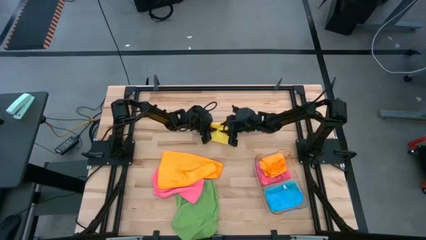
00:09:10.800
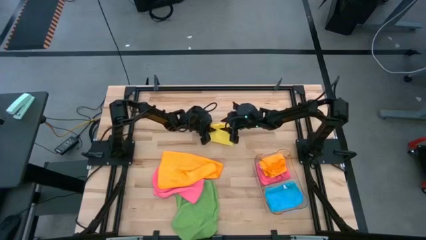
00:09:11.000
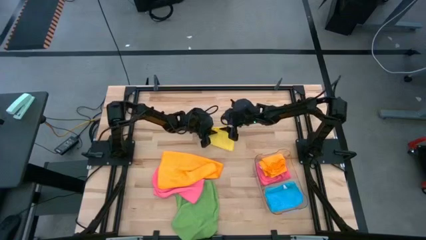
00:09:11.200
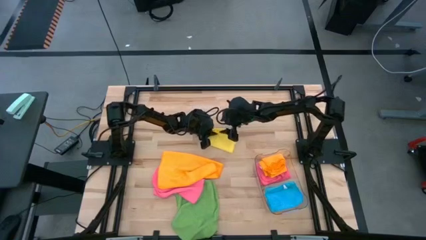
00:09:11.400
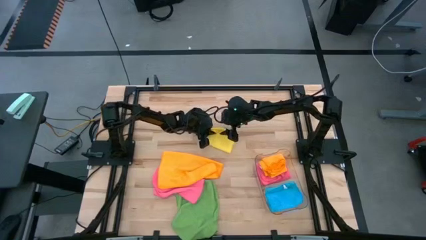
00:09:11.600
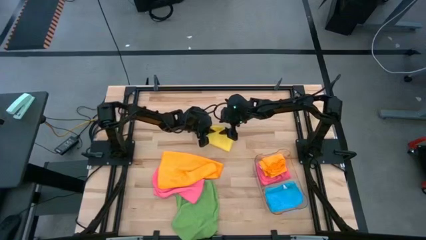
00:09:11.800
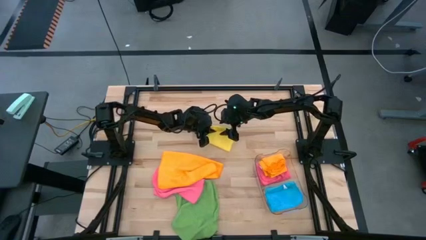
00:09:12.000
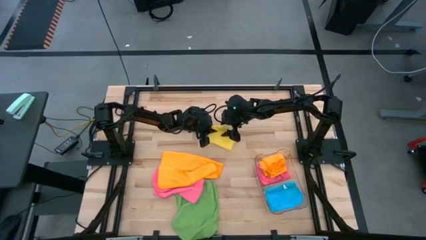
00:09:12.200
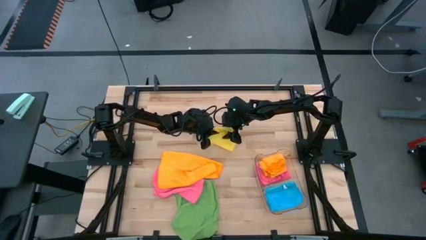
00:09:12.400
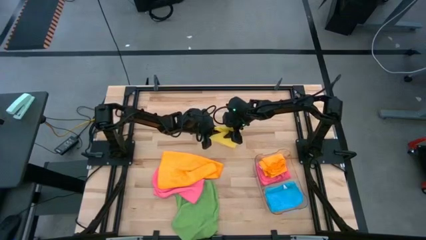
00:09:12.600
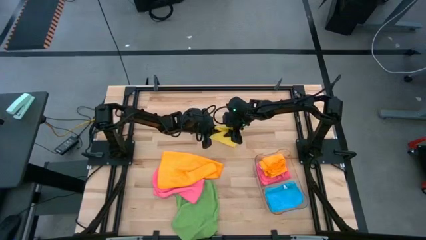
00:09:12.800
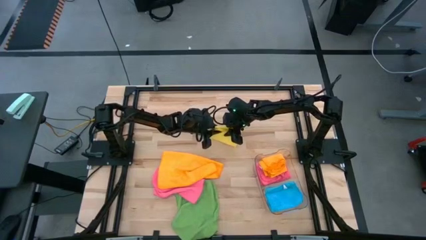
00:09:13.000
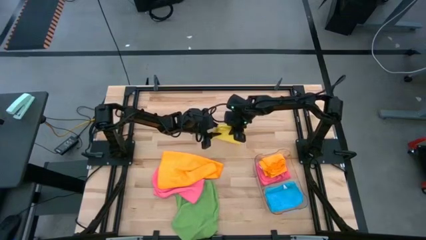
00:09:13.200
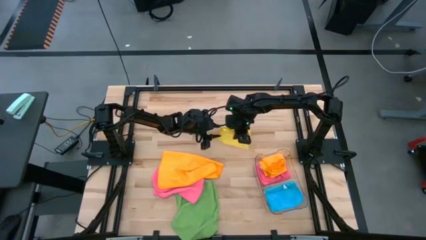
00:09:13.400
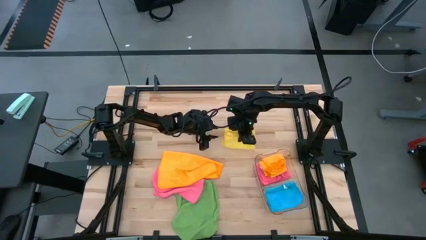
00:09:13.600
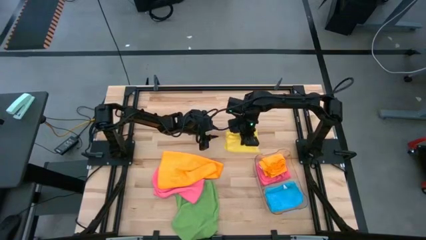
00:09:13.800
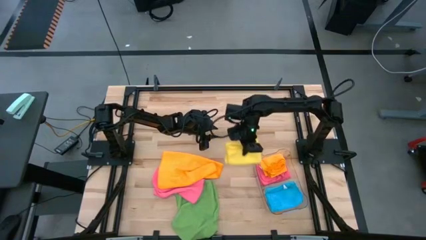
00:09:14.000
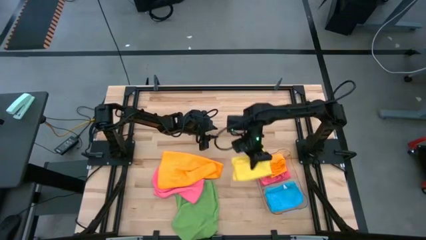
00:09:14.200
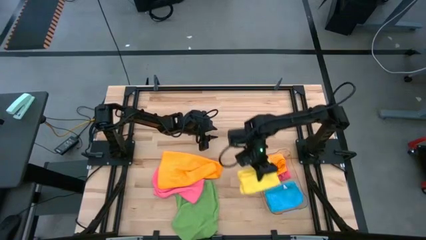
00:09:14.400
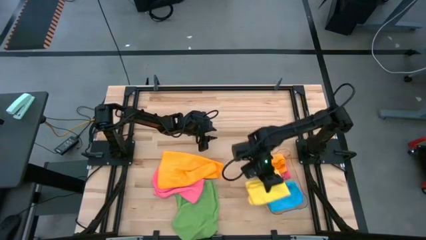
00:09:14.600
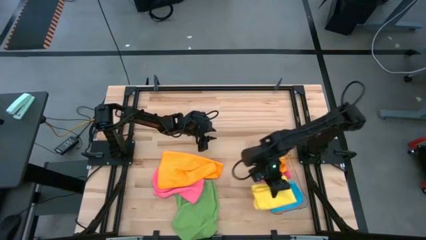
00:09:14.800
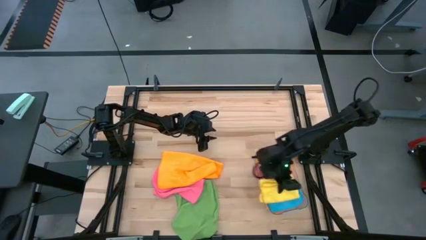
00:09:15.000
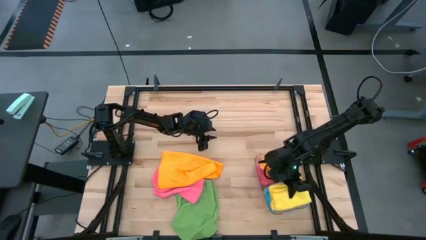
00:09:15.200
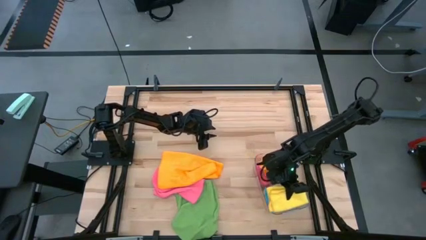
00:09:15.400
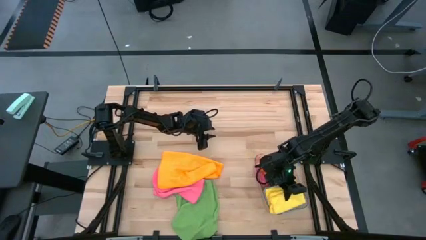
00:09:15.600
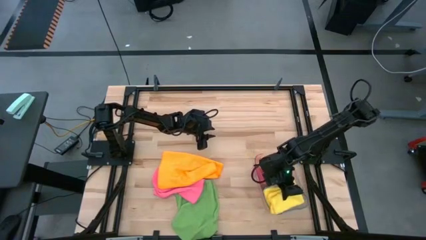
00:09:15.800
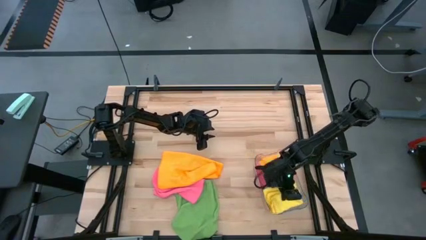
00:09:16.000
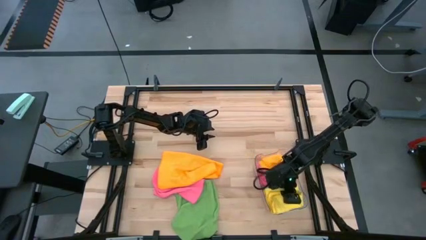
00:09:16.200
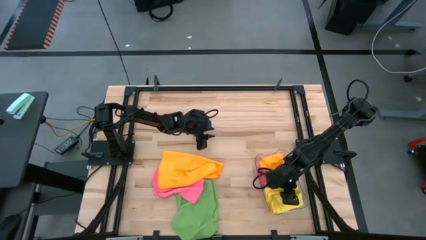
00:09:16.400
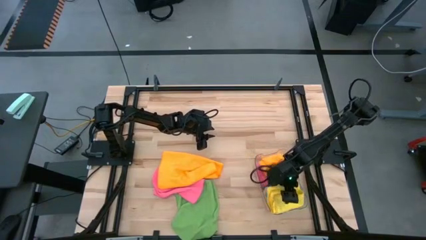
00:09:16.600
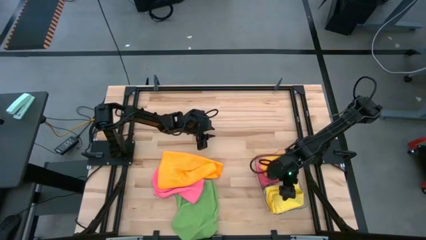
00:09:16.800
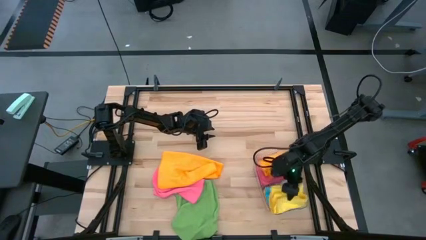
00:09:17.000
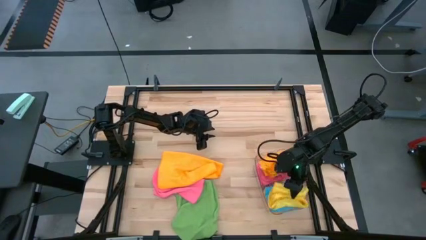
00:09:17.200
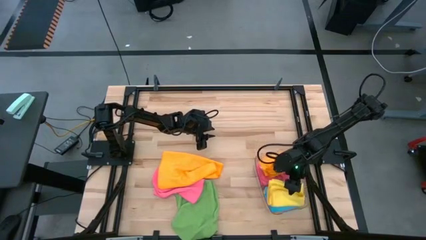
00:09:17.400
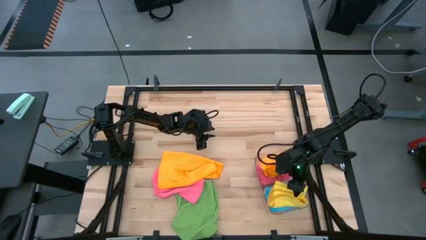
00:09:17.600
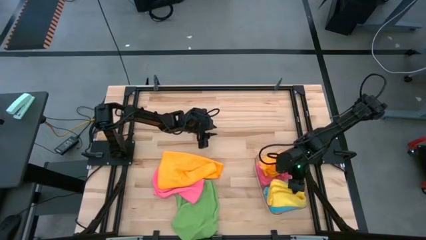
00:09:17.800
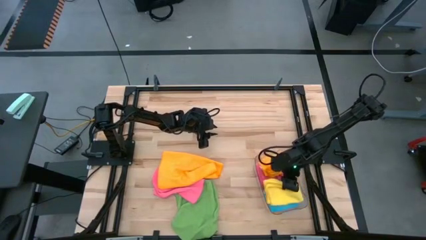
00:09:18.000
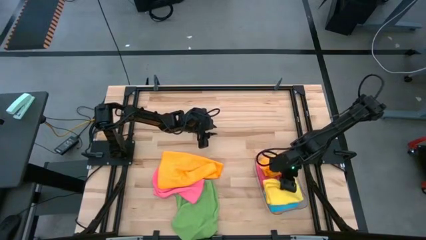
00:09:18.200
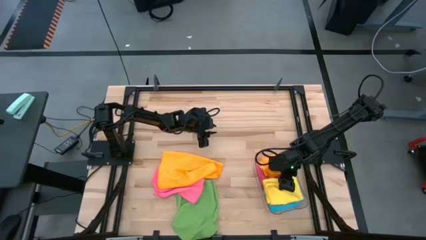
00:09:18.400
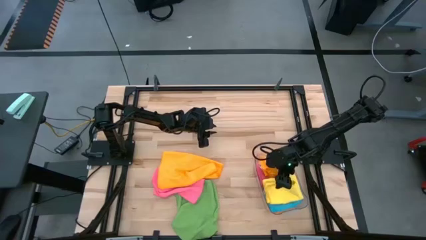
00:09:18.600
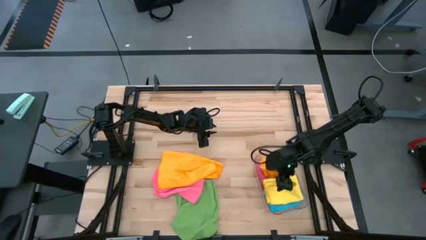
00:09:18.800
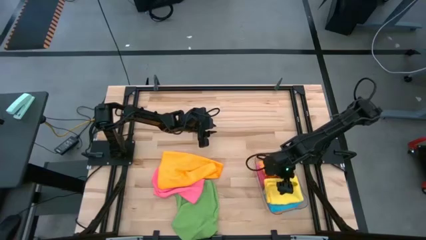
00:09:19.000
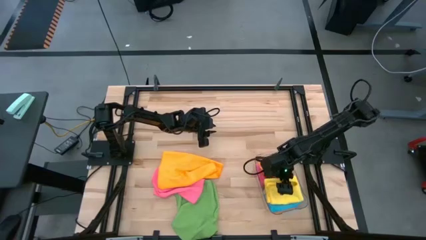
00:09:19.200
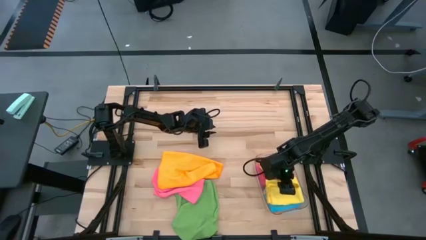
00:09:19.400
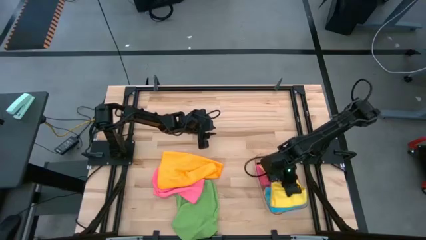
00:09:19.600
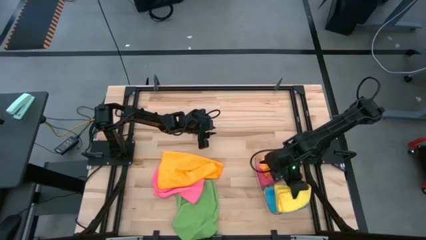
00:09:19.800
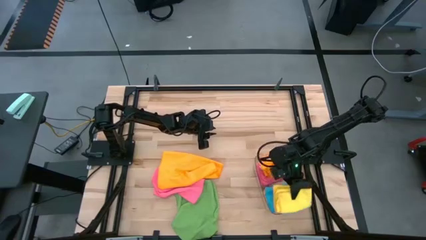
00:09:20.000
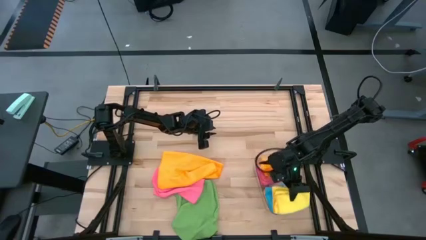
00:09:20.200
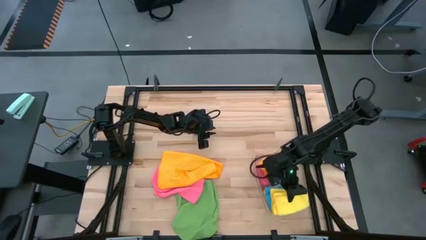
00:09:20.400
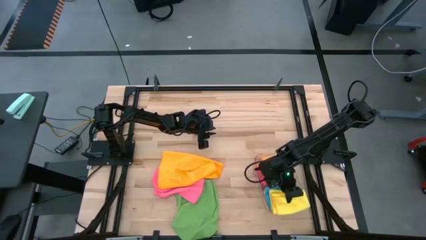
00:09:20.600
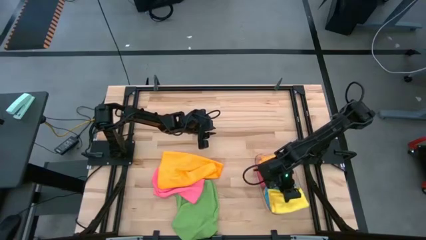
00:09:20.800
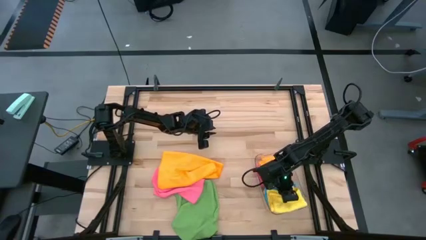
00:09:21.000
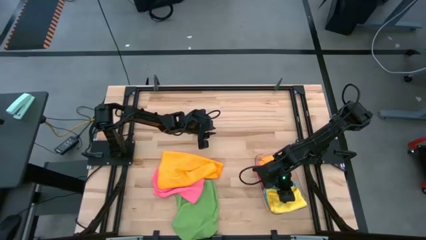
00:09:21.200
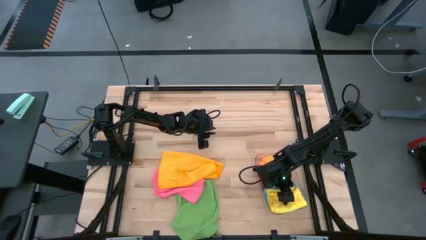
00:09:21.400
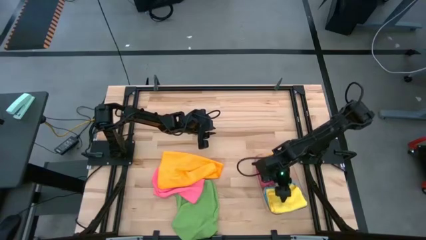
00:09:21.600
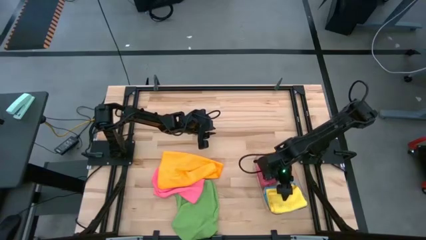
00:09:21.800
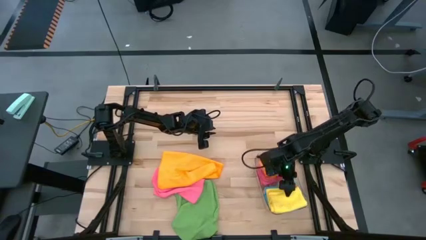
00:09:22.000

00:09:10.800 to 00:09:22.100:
Task: Fold microfiber towels
Put the folded yellow towel into the transparent bin

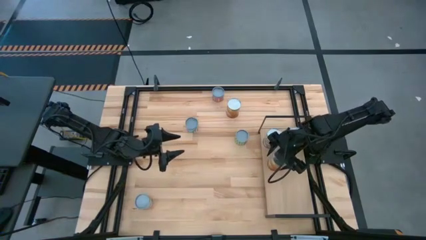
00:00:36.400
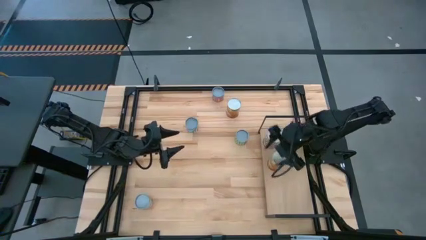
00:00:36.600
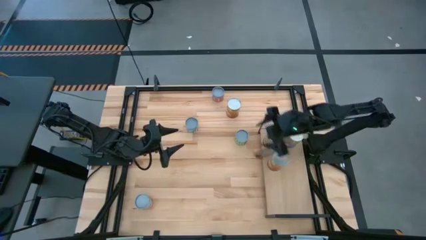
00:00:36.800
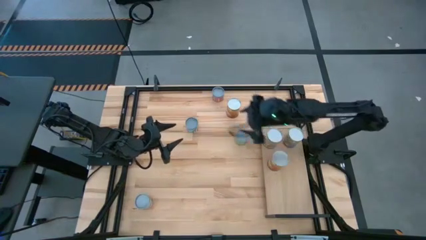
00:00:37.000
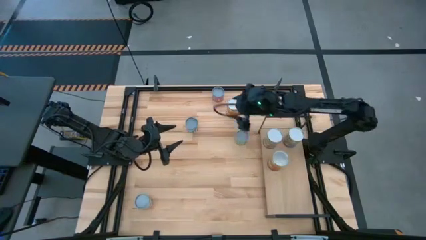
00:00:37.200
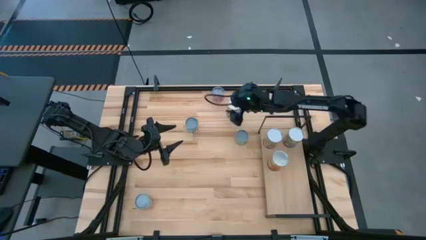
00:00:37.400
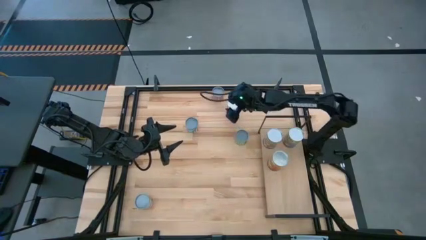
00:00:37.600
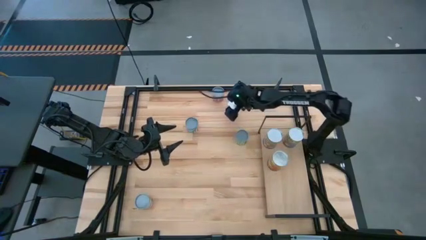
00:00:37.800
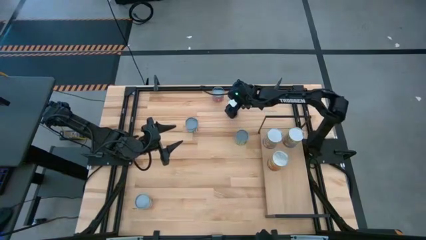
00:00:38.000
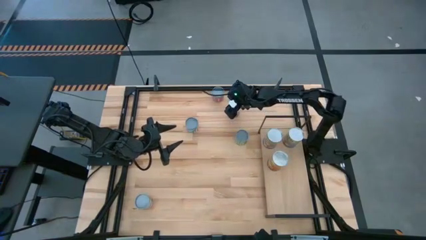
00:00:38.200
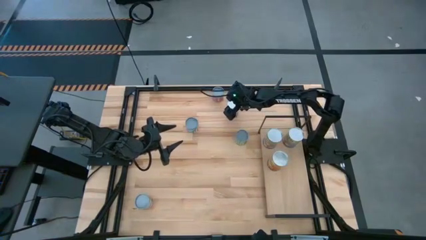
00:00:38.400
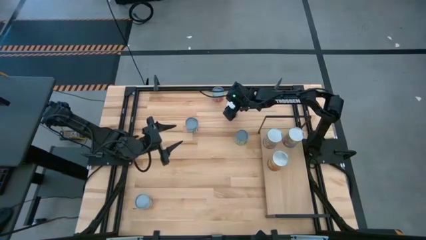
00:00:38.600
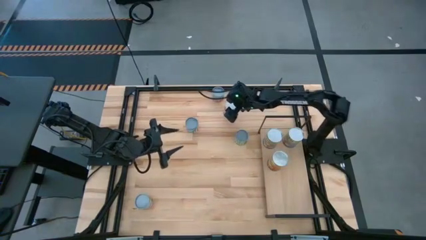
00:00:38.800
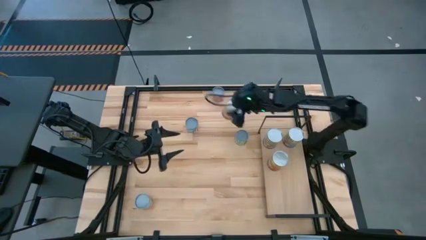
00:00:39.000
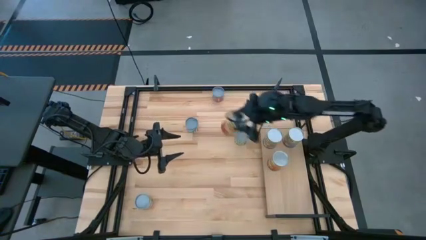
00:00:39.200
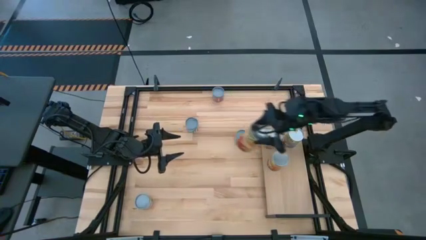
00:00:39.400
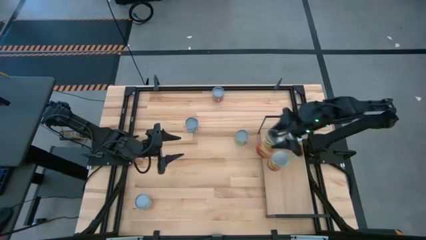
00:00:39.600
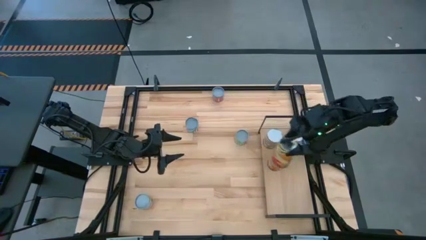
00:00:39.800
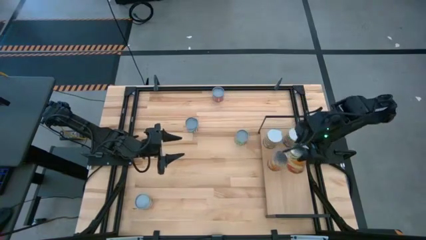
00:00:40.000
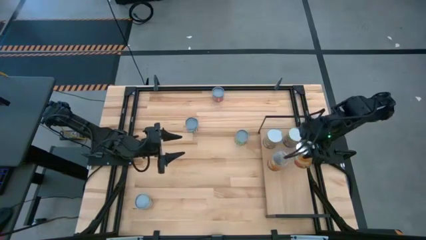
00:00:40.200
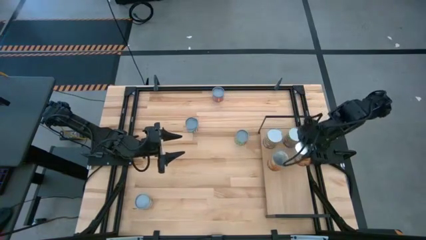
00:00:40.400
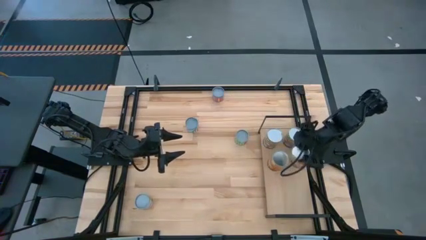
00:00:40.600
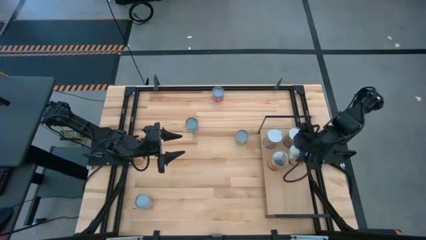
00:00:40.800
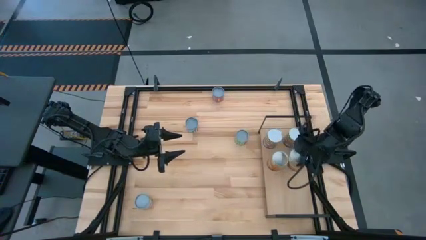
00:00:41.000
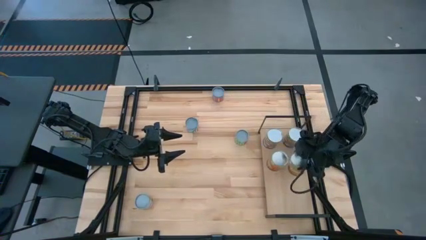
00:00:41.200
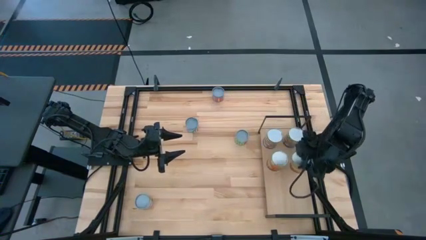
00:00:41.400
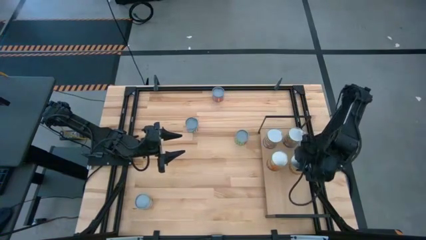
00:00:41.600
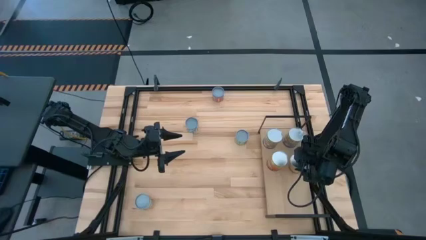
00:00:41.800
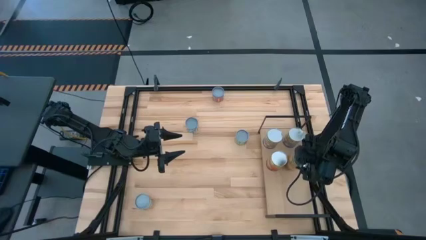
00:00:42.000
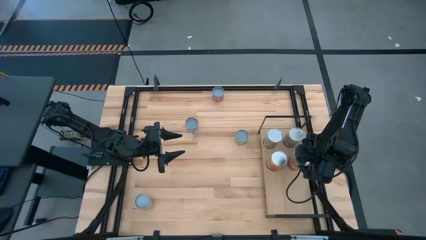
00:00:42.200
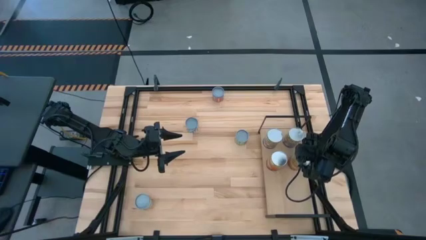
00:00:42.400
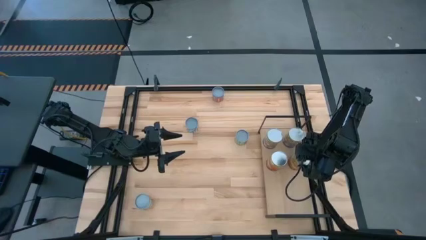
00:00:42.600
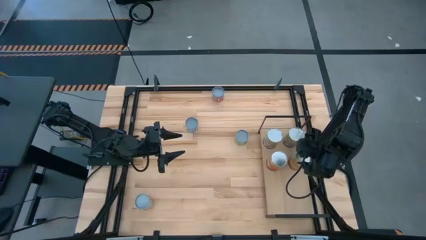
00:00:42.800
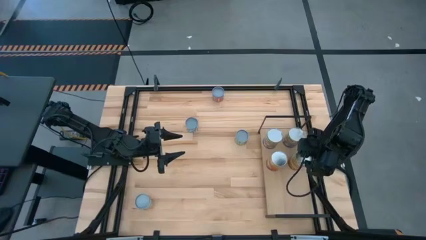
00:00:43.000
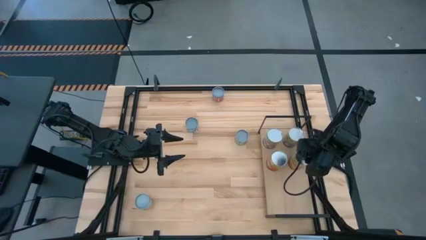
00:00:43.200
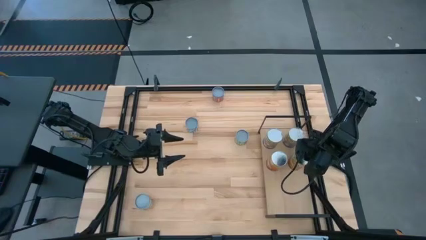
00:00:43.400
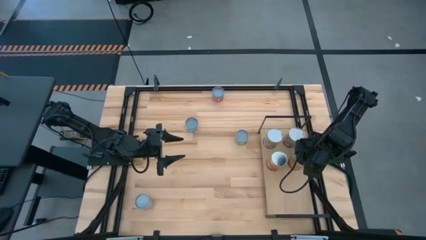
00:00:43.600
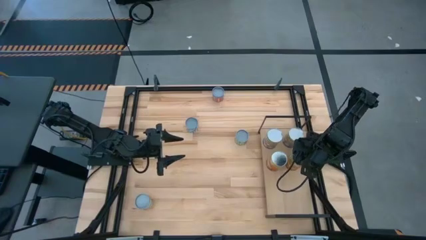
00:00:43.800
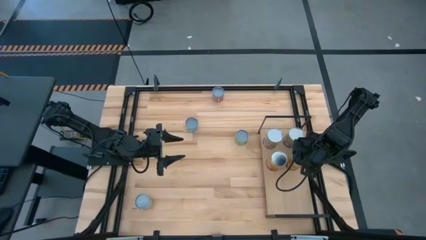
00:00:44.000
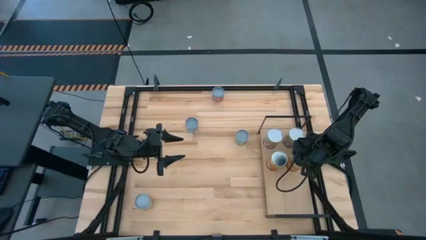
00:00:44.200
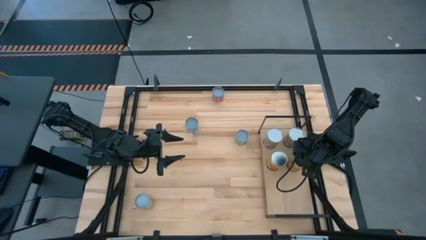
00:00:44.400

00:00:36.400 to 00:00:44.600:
Task: Pick and place cans onto a shelf
Put the canned corn on the shelf aligned with the canned corn
